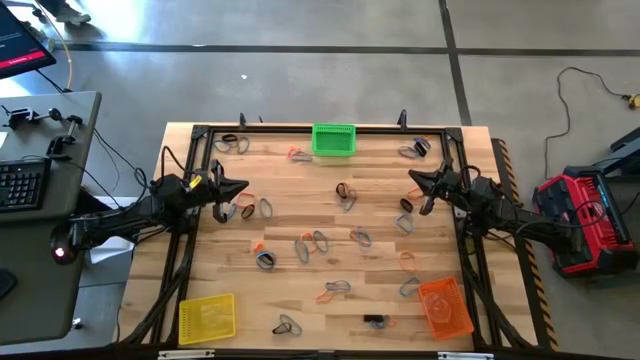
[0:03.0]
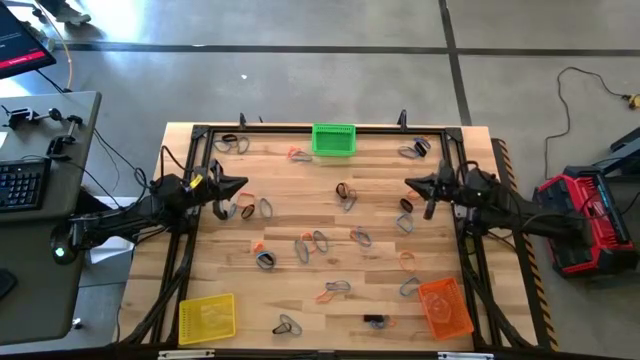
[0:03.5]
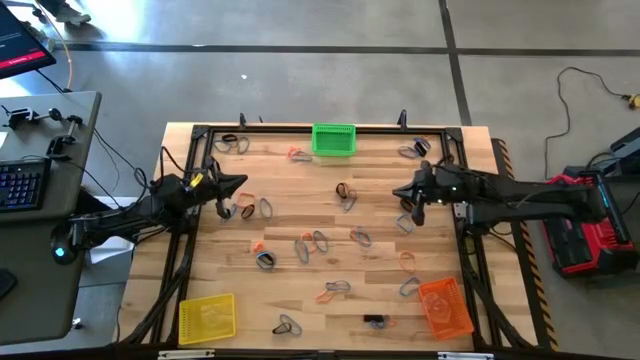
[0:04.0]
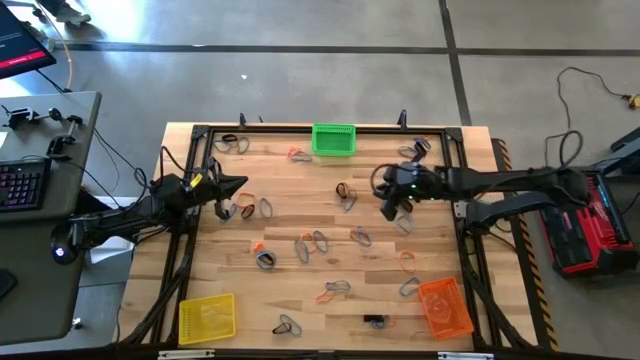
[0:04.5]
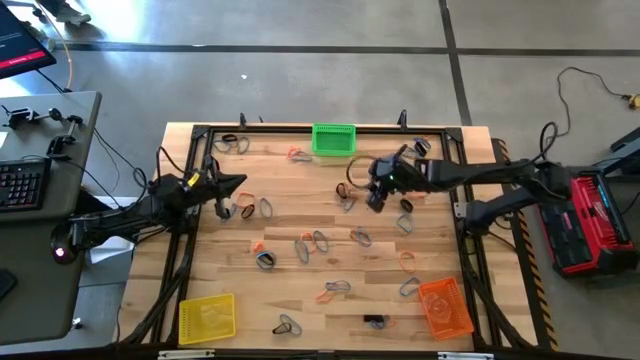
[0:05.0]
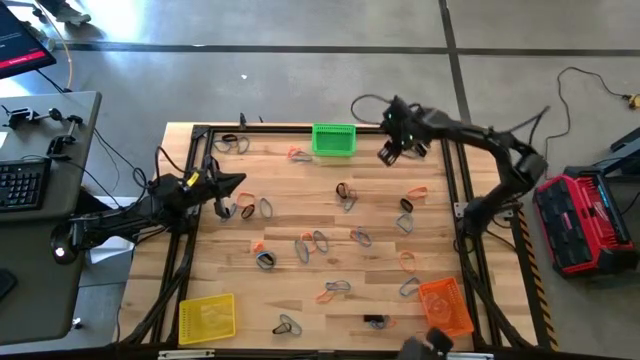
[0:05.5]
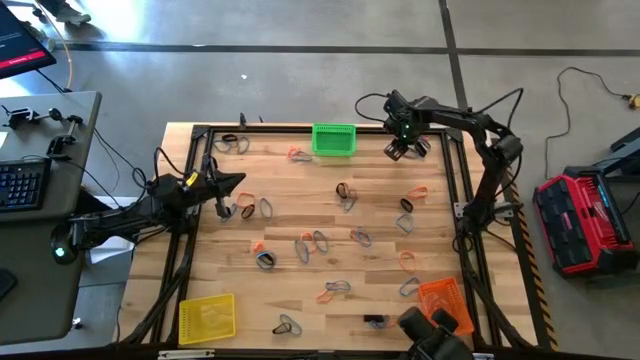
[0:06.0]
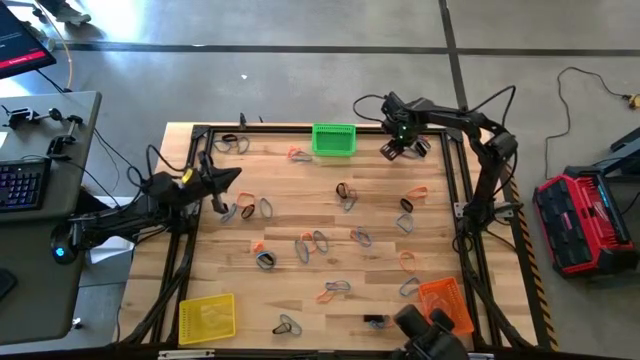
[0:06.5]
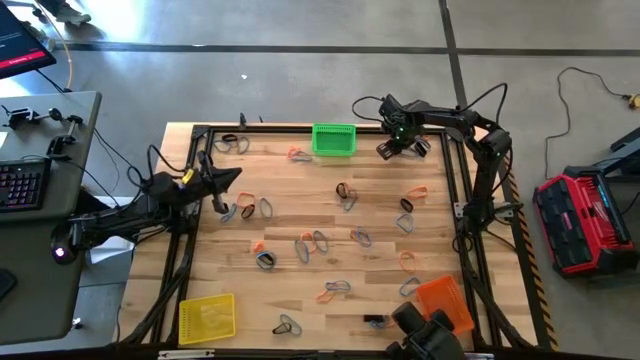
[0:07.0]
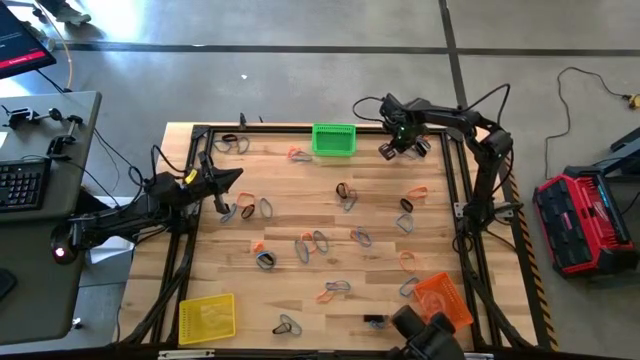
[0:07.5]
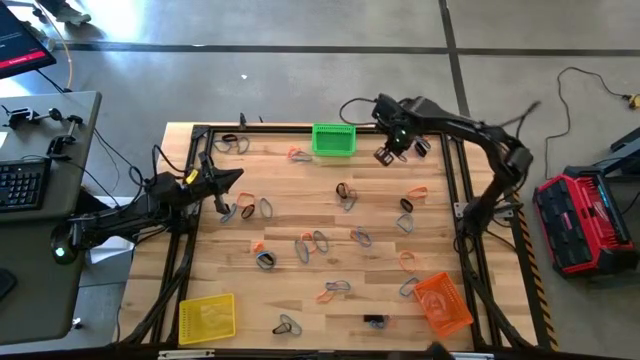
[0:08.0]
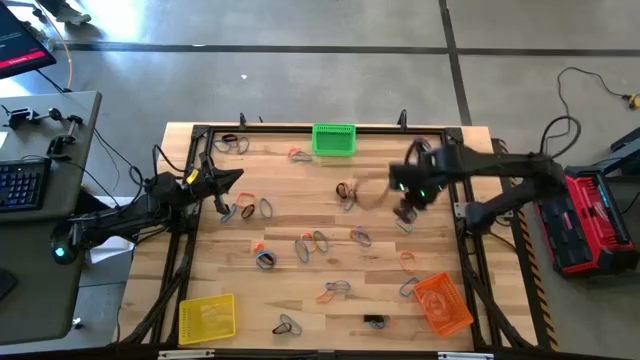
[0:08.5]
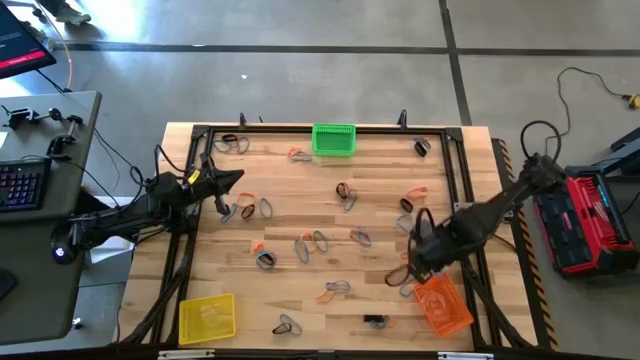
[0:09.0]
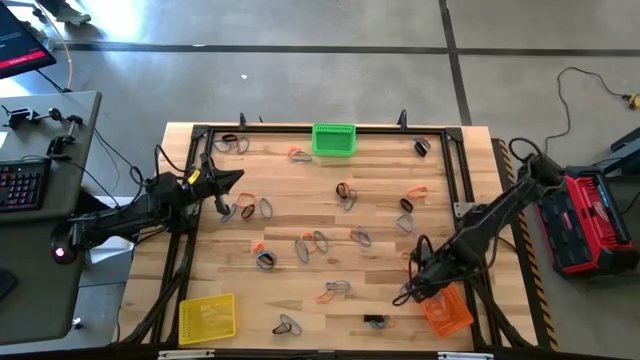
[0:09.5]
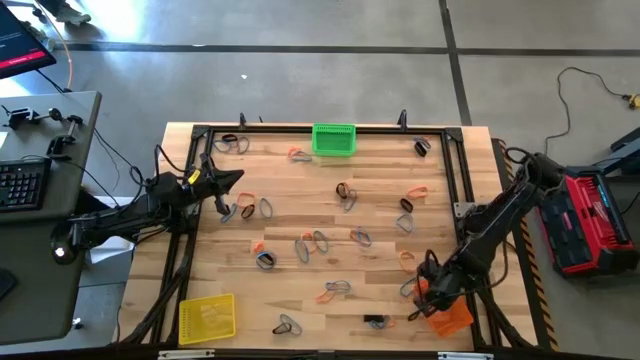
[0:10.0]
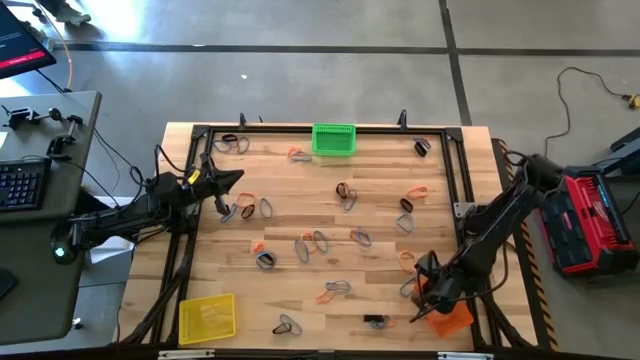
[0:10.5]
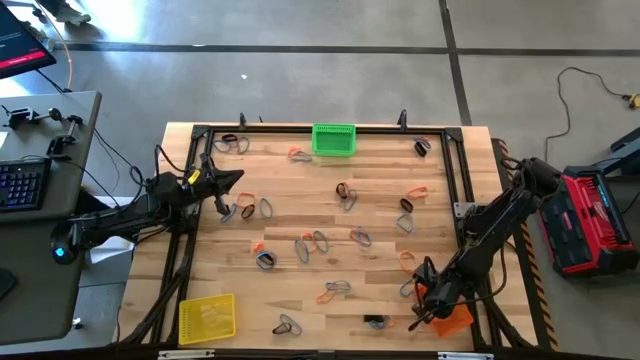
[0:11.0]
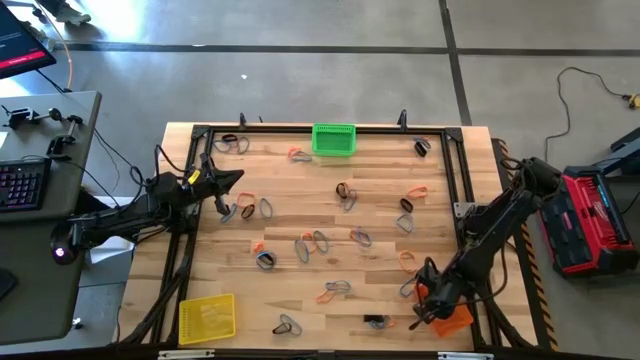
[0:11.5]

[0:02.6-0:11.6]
Task: Sort rubber bands into baskets
Put the blue rubber band into the orange bin

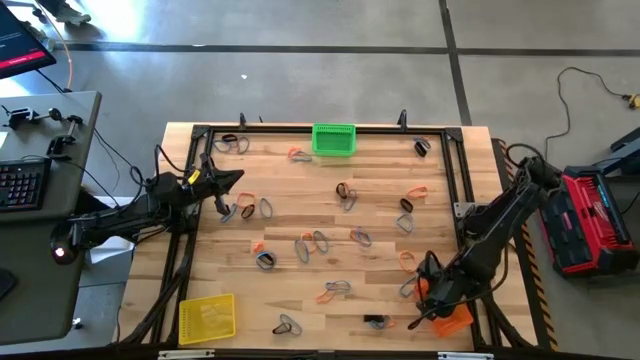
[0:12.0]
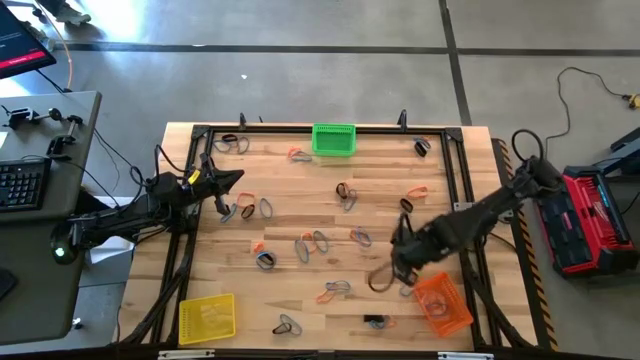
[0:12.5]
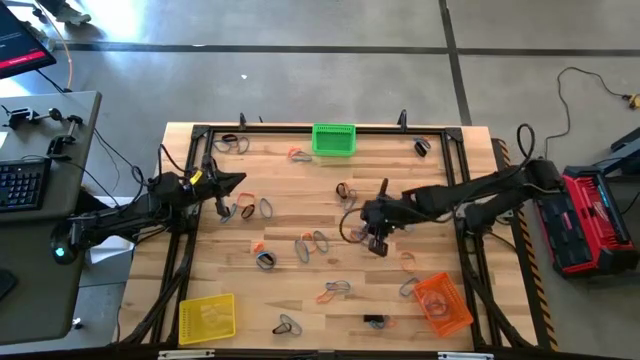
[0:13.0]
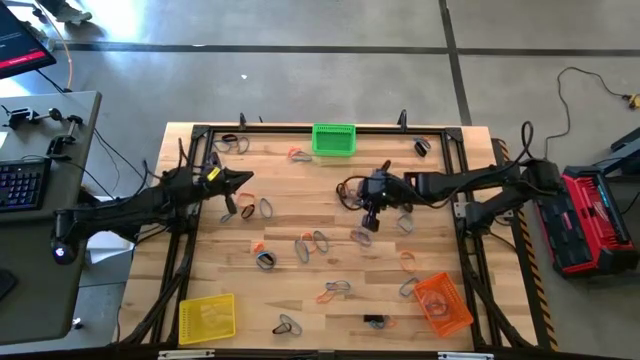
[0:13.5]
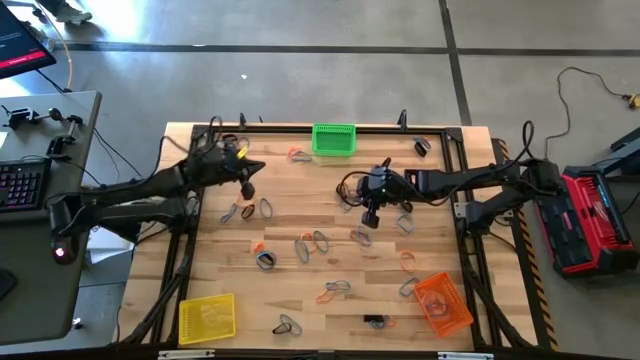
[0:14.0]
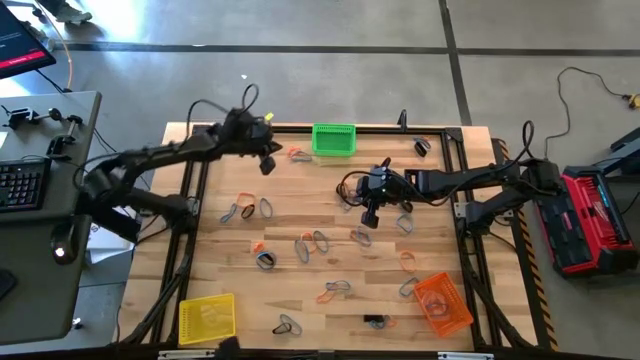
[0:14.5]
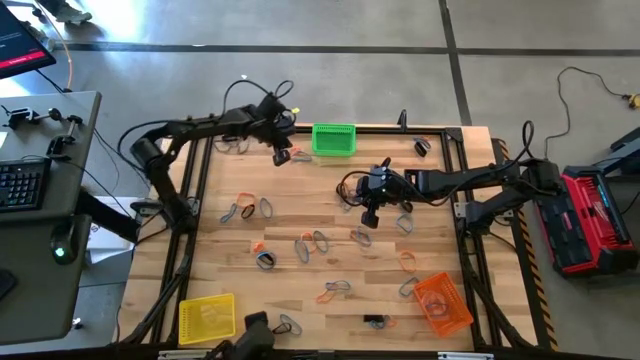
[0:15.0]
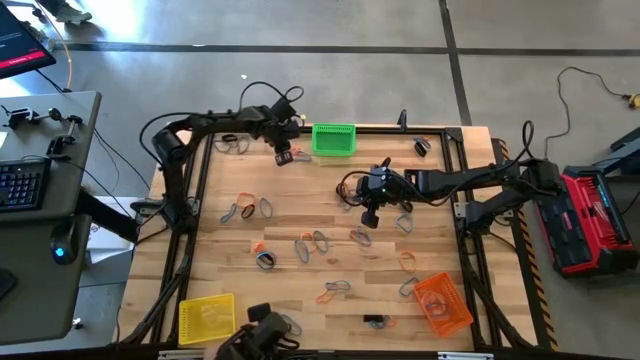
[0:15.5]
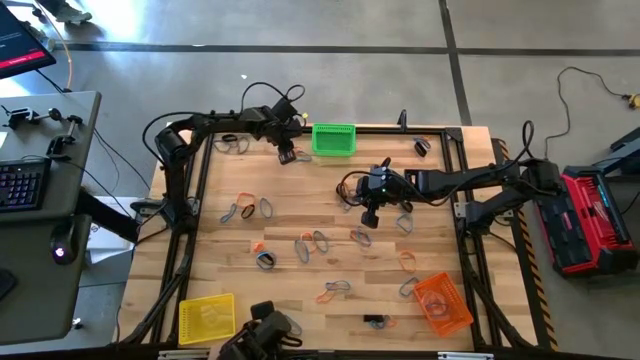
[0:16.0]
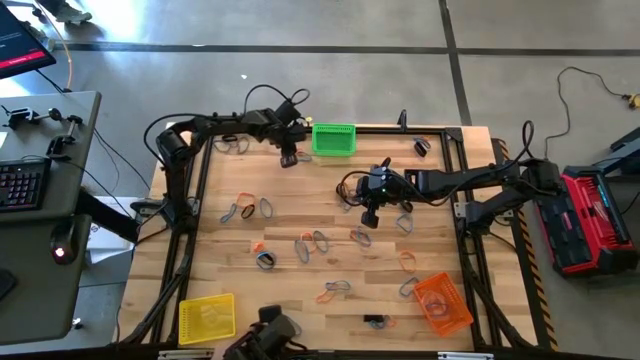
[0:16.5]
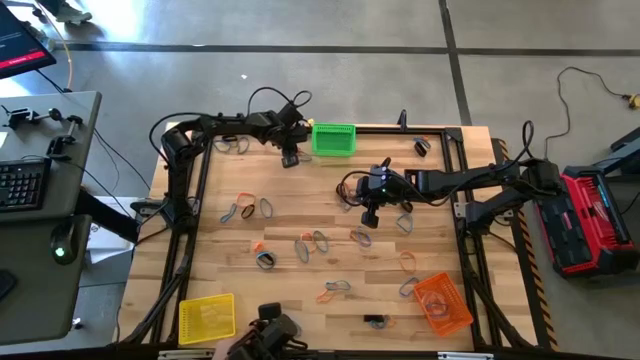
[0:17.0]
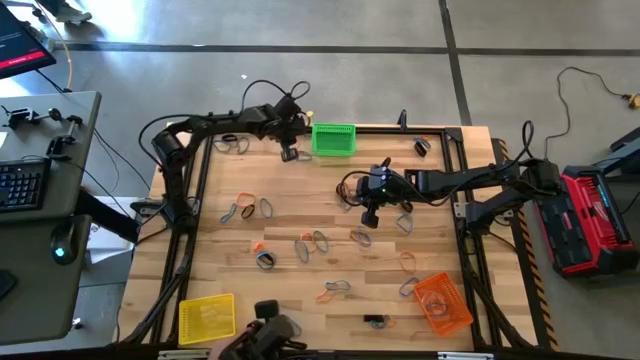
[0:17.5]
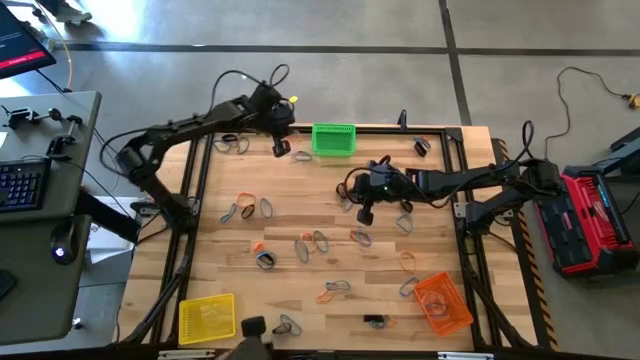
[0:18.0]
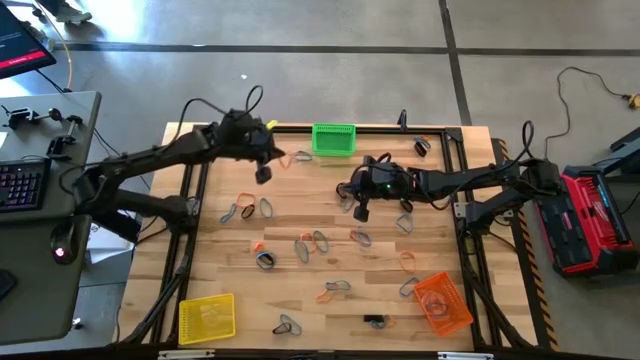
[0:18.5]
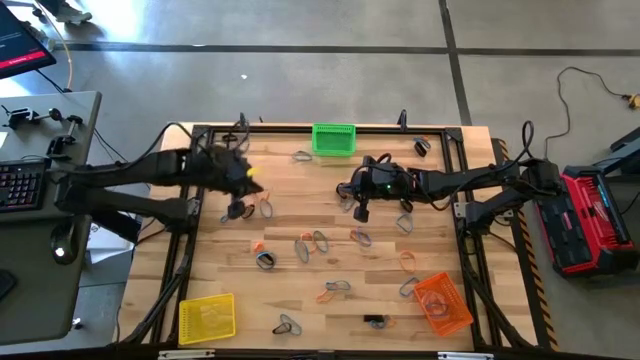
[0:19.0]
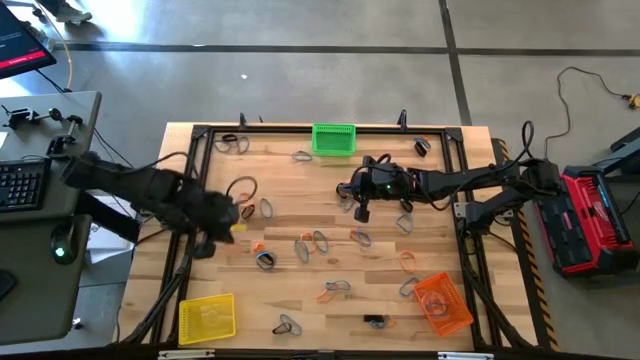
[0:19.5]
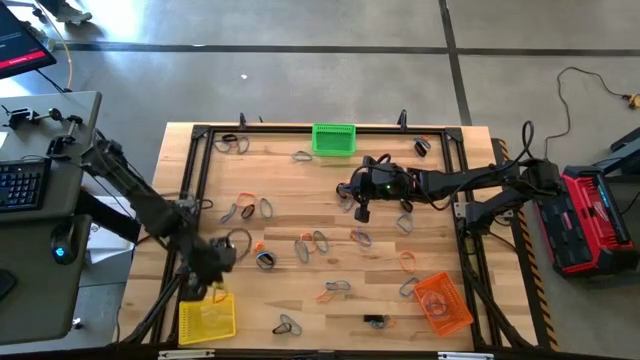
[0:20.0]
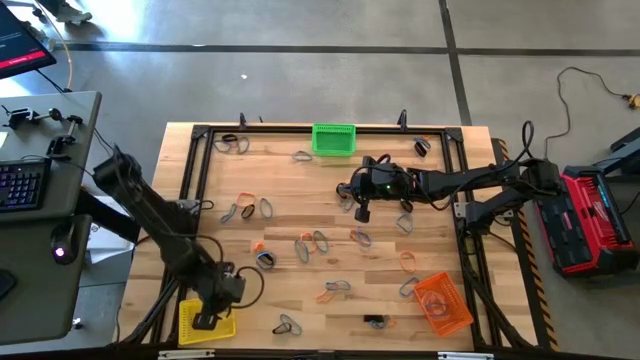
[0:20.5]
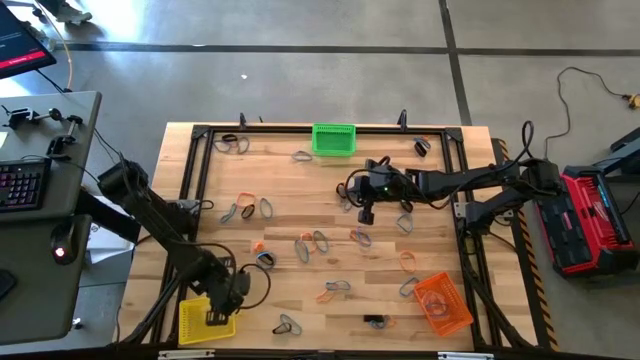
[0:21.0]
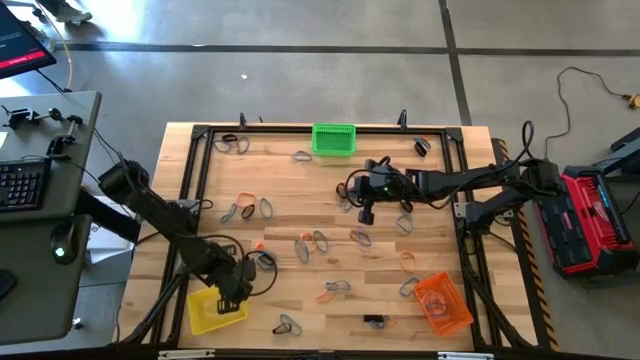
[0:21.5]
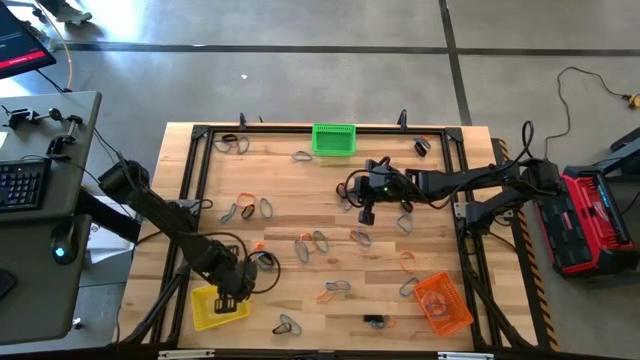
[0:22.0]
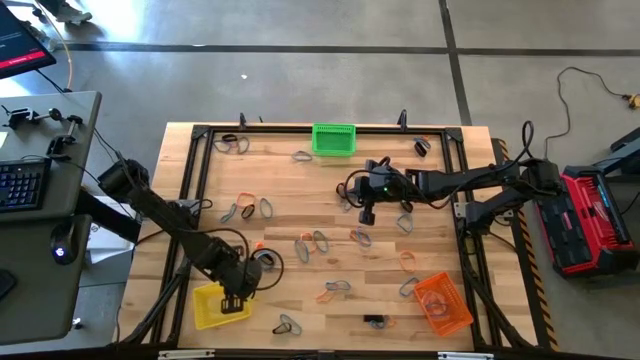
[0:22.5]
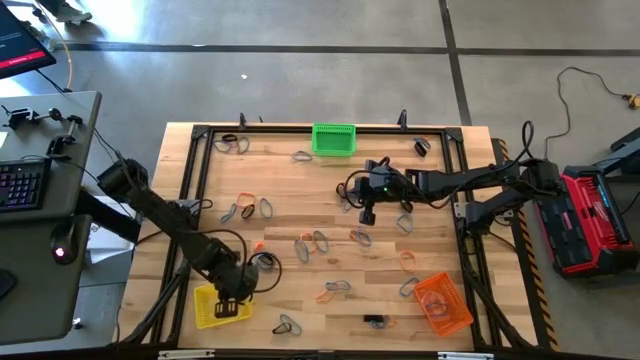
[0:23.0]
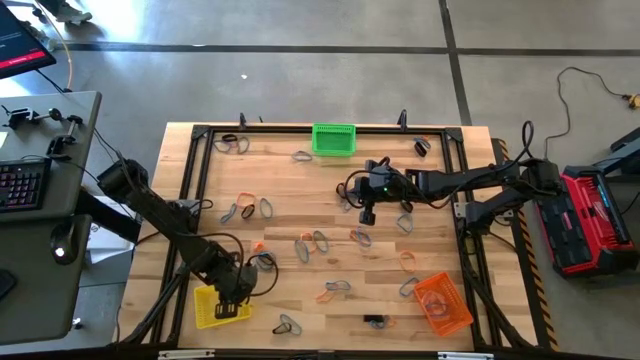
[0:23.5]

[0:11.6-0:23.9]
Put the orange rubber band into the yellow bin
